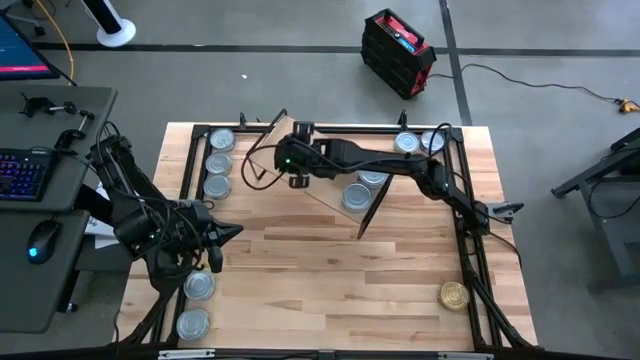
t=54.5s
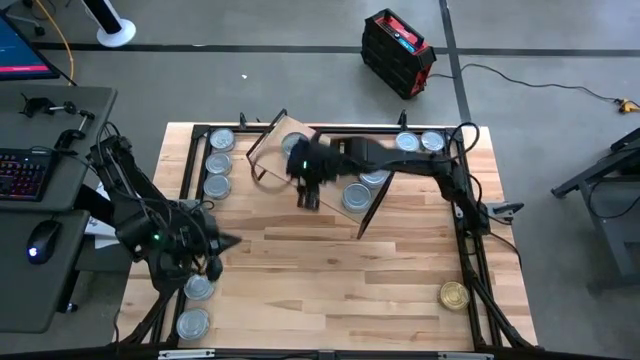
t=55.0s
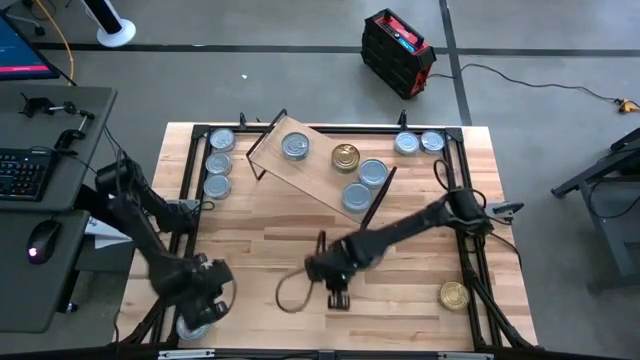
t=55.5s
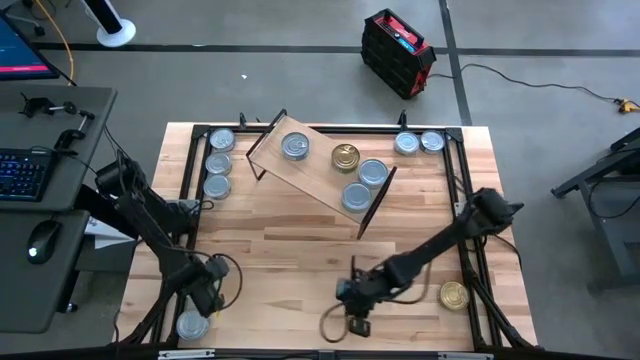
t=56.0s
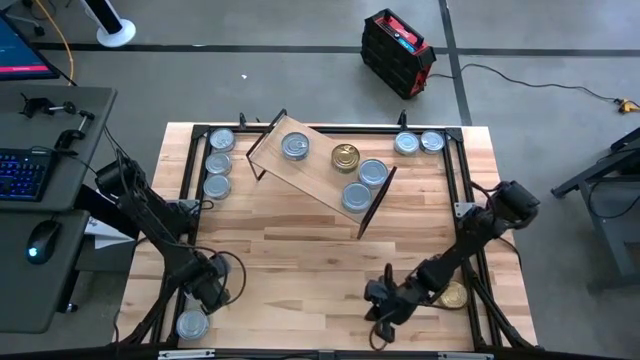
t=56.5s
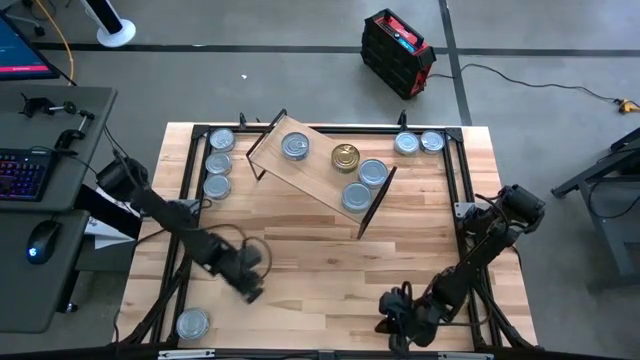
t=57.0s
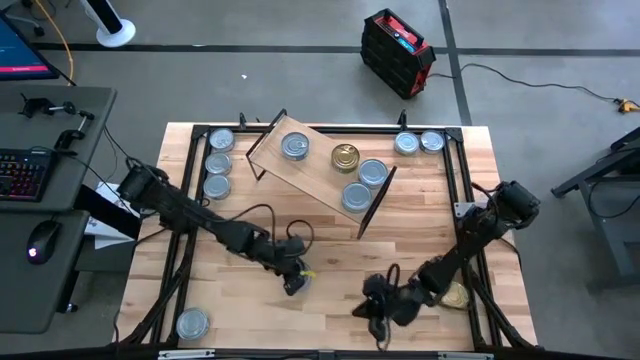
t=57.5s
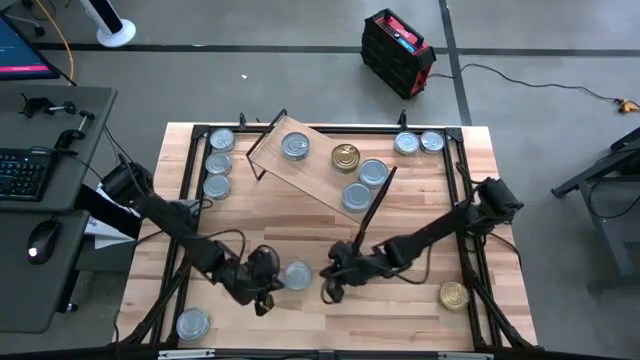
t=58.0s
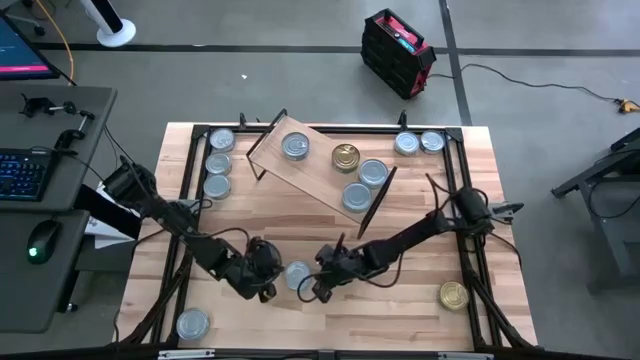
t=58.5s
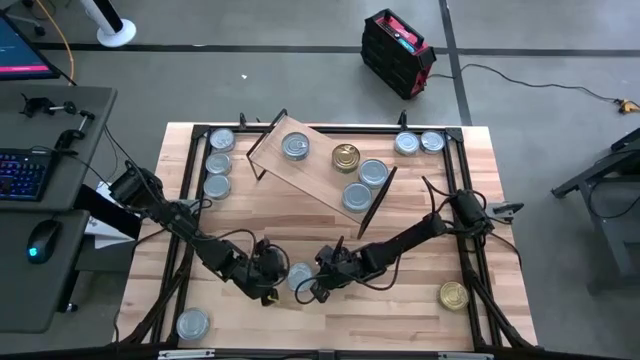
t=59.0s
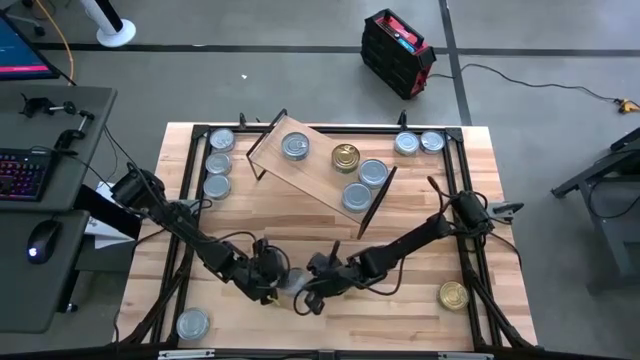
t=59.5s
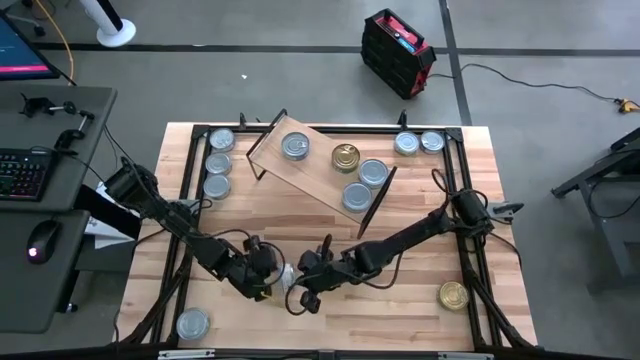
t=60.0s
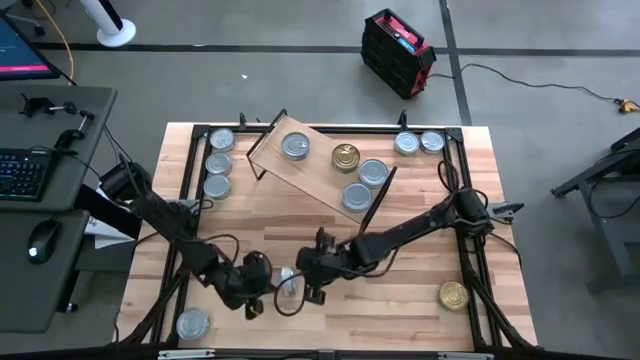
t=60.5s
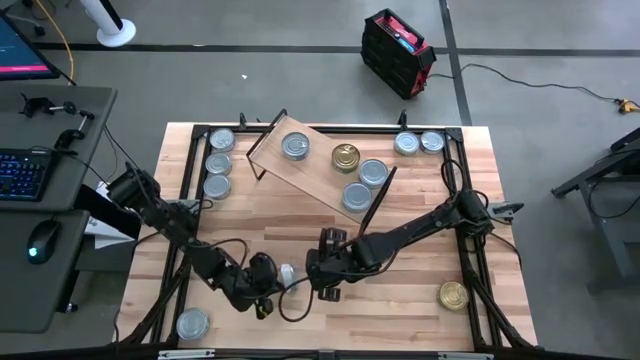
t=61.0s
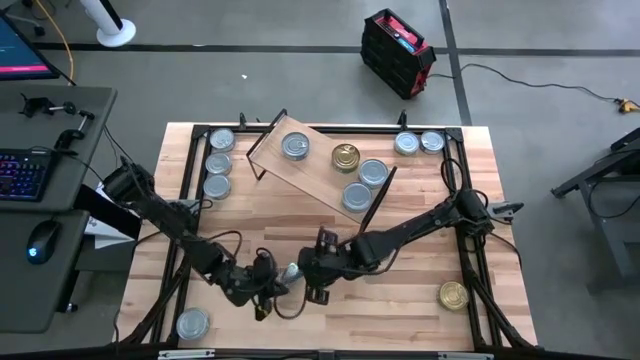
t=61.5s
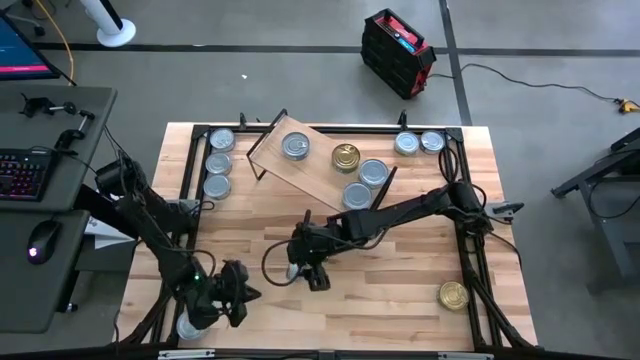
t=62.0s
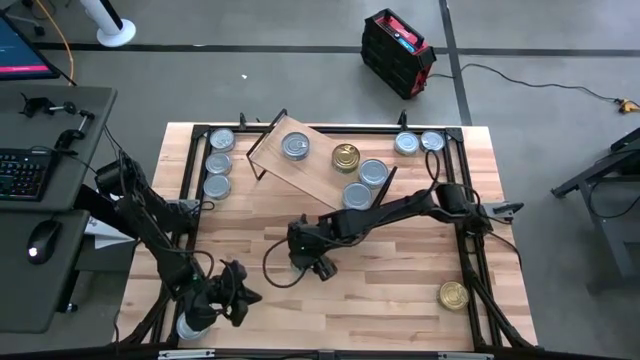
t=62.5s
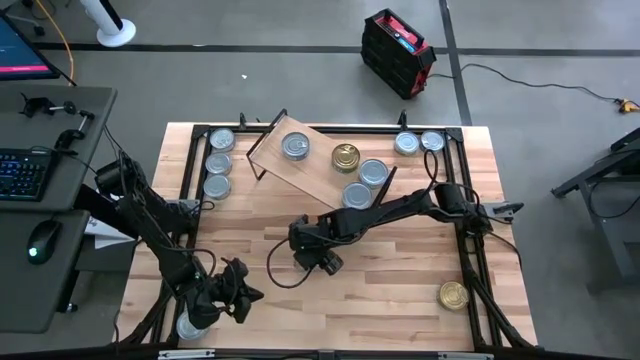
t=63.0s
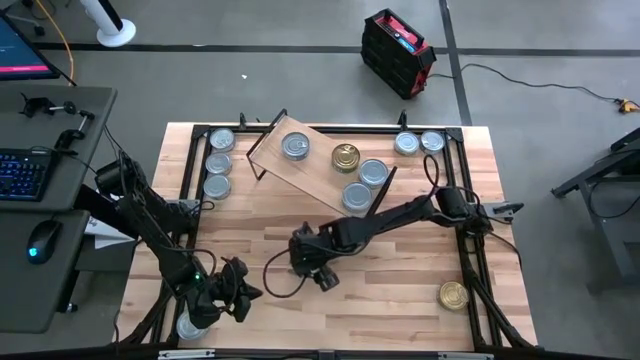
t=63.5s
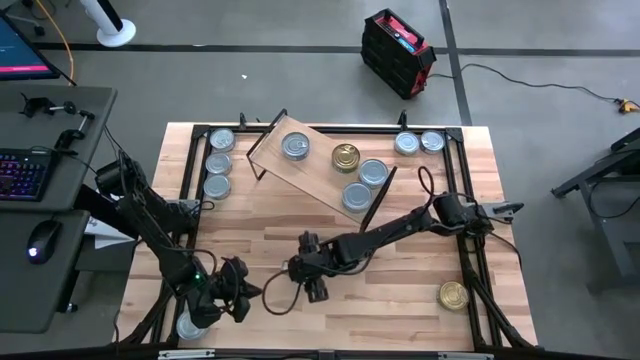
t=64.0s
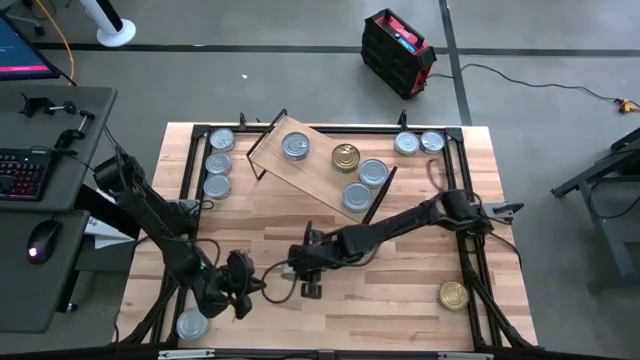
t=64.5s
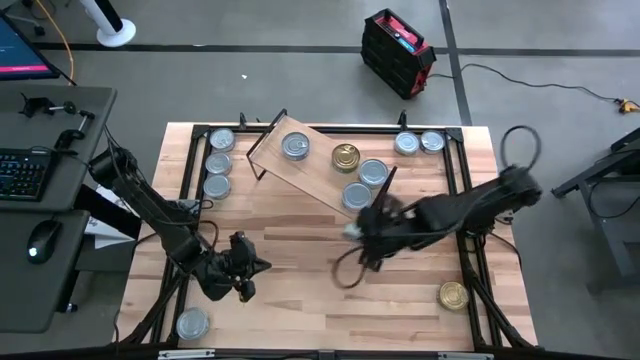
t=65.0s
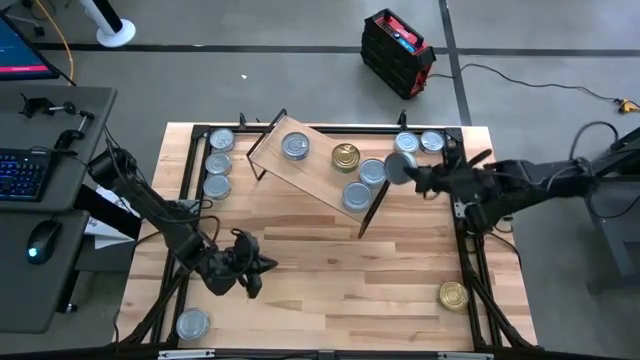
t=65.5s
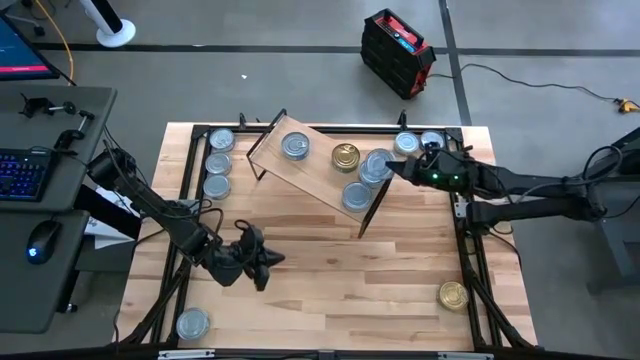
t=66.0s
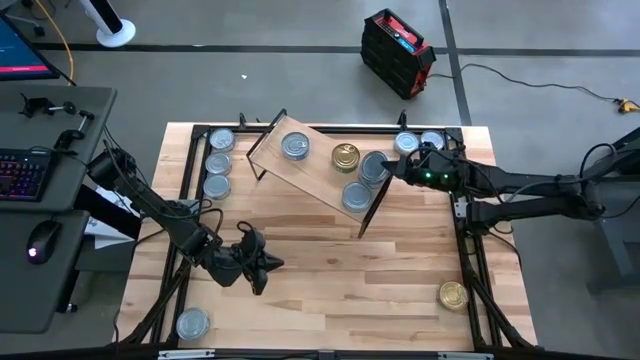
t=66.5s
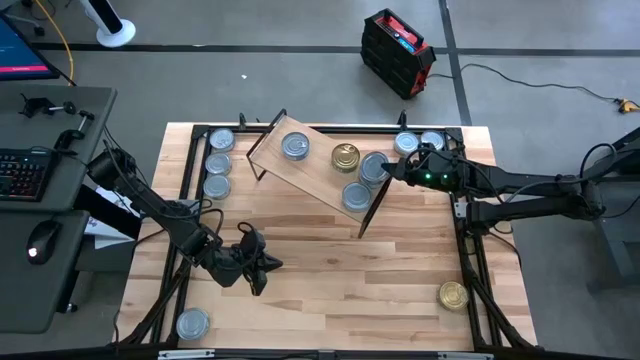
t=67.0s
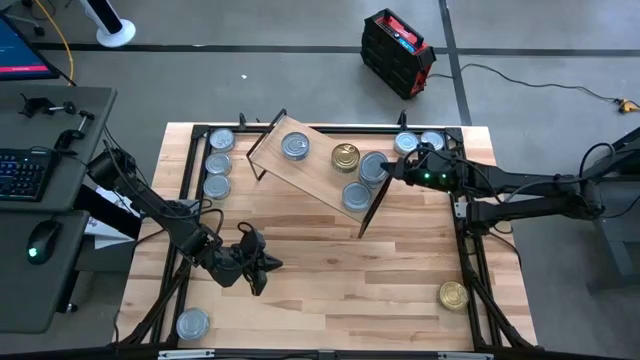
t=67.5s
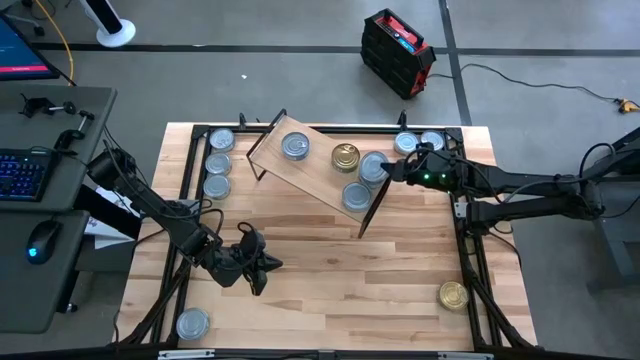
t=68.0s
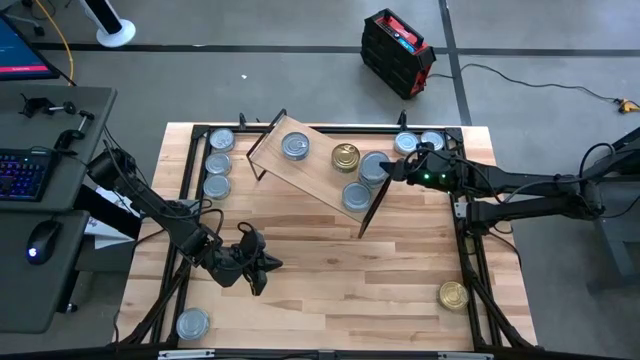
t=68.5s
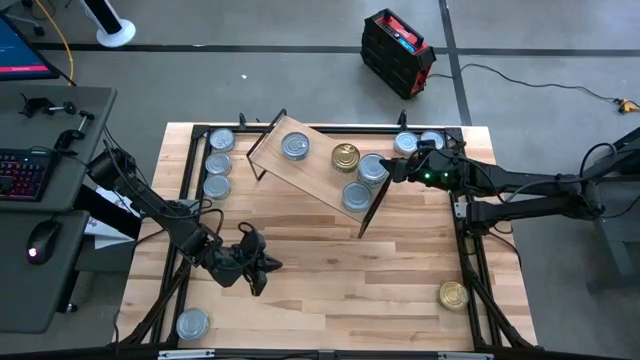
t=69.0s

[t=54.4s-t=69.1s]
Task: Stack canned seafood by type on shelf
Stack the white-green tuna can on top of the other white-green tuna cans on the shelf

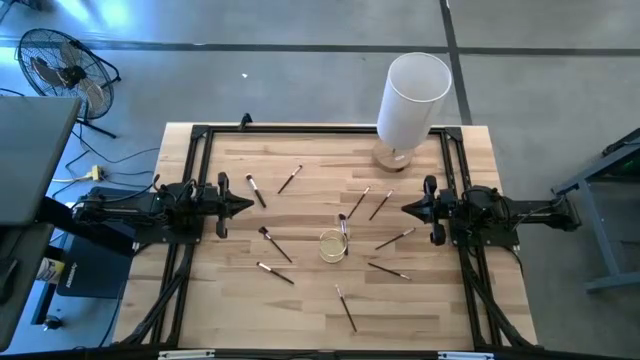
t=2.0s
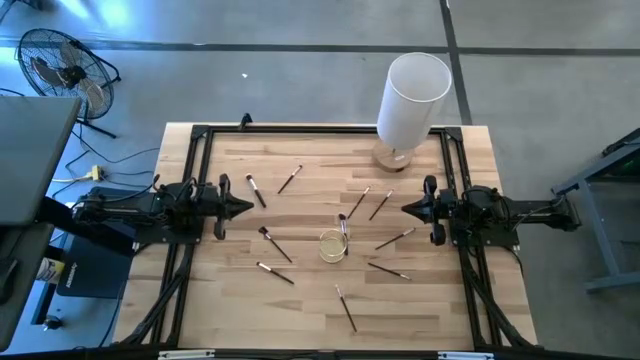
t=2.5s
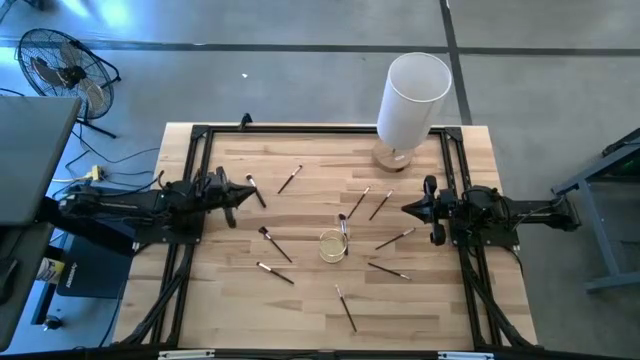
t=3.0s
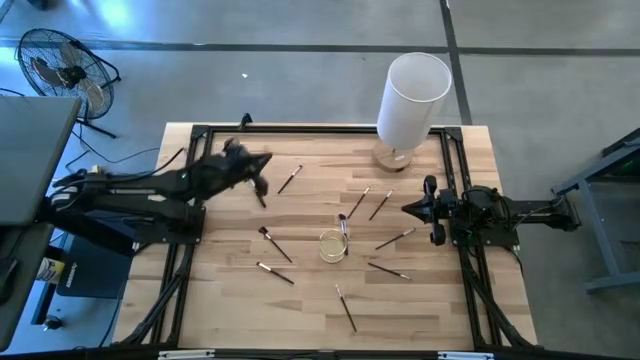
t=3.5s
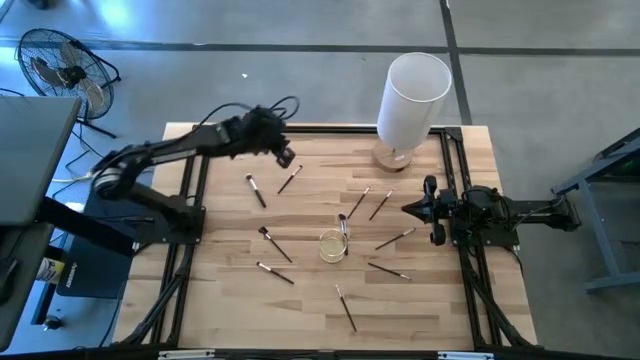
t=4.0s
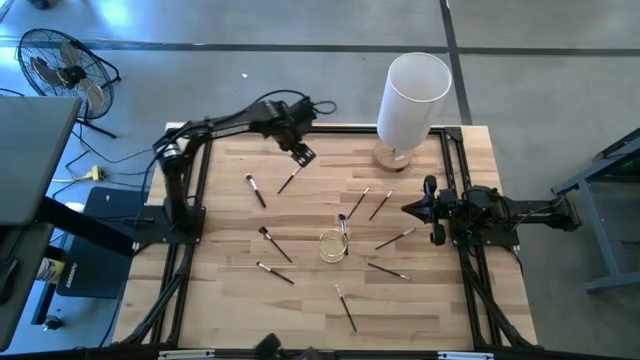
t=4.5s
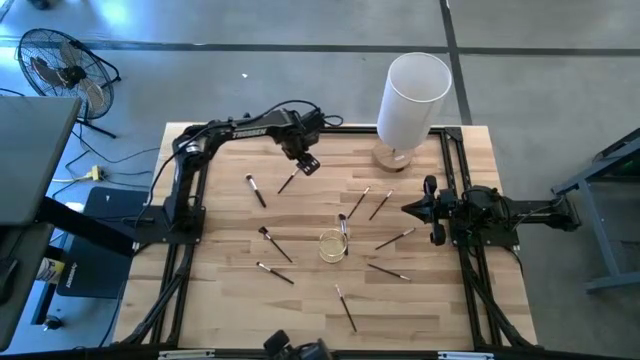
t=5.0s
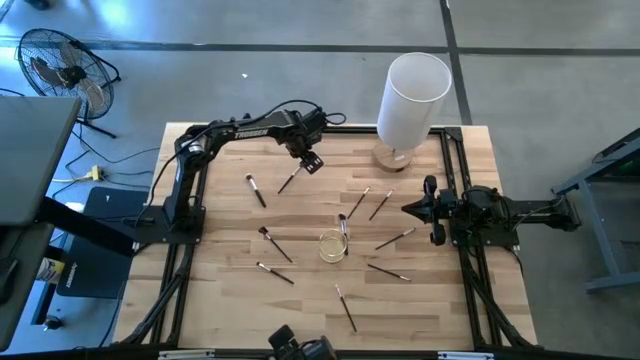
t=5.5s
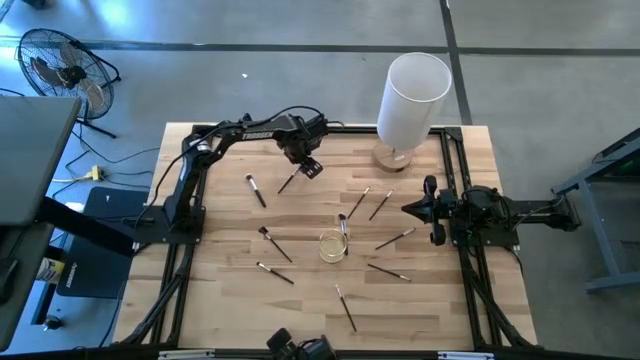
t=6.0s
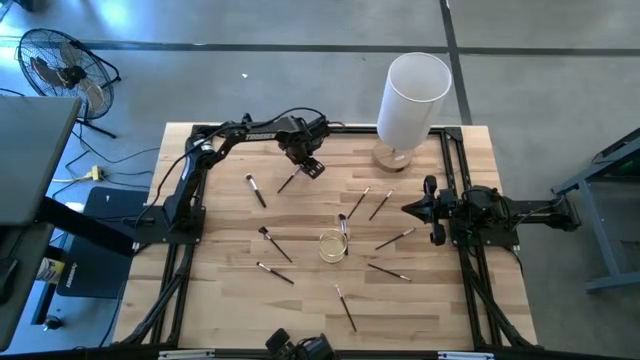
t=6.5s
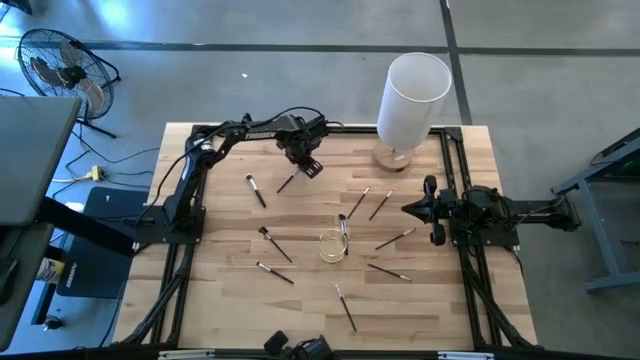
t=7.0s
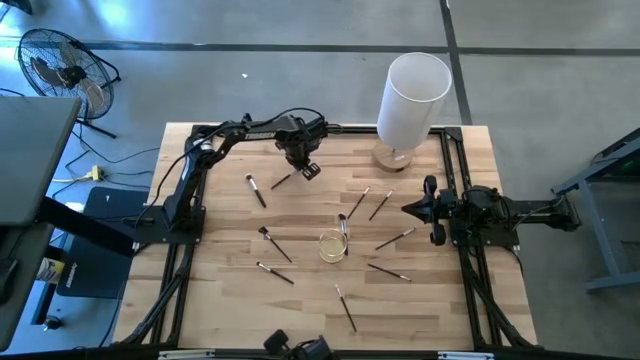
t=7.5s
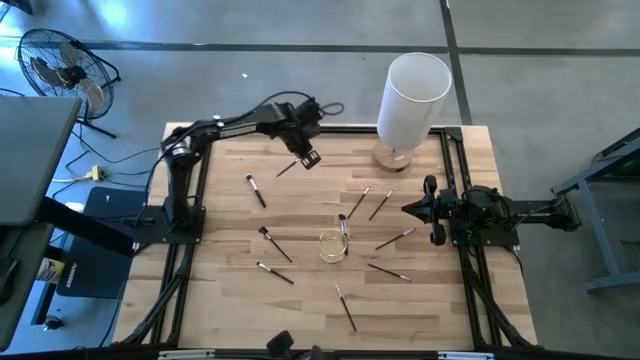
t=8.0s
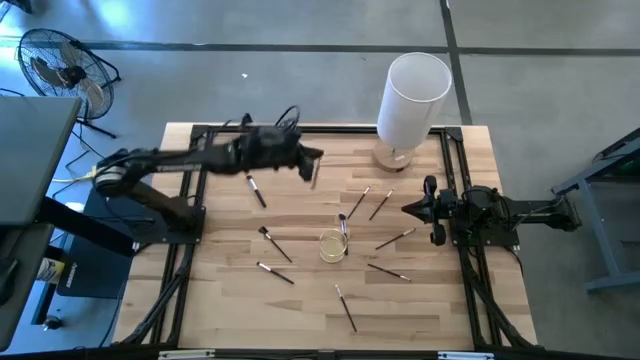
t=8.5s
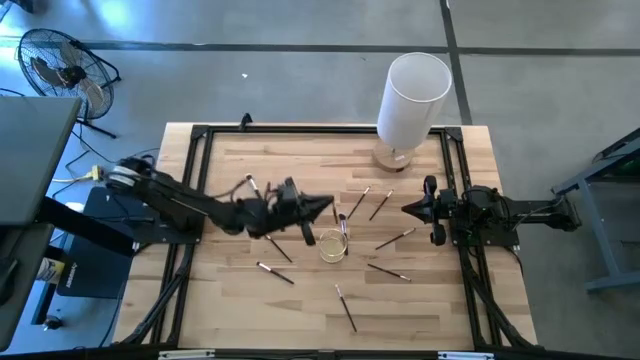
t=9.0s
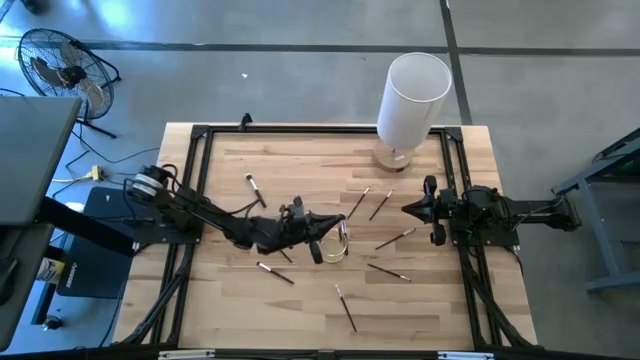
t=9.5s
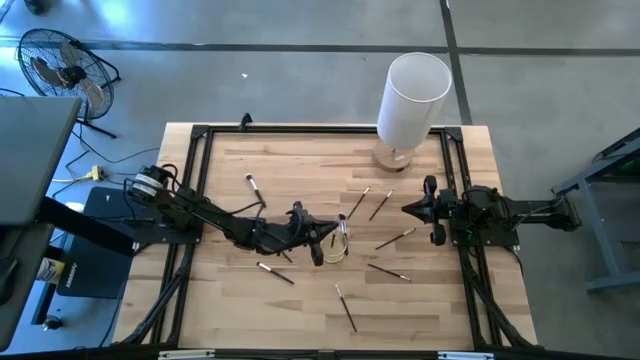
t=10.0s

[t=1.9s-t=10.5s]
Task: Put items in baskets/containers
Put the eyeshadow brush into the mesh organizer
